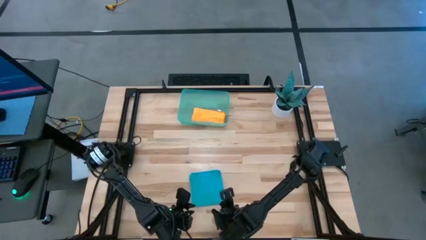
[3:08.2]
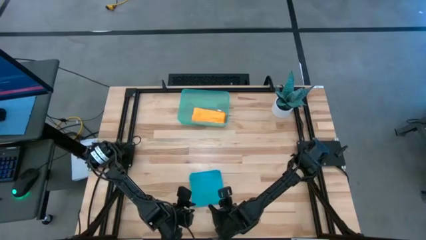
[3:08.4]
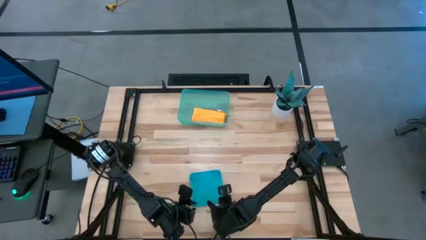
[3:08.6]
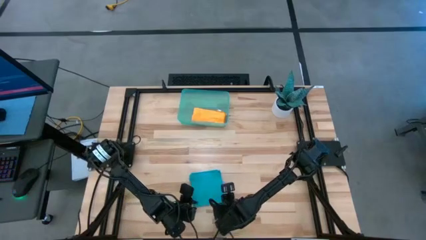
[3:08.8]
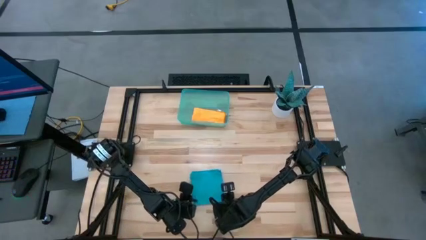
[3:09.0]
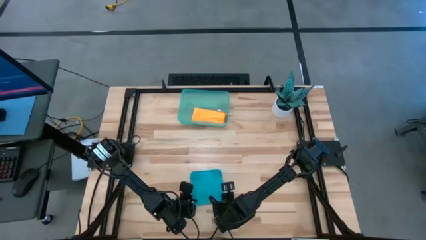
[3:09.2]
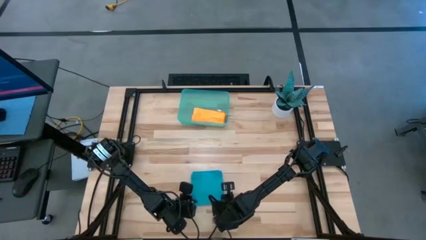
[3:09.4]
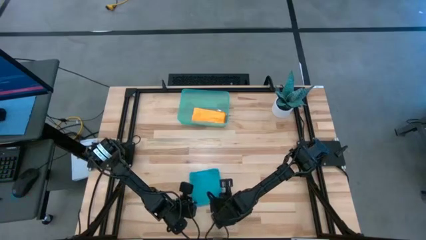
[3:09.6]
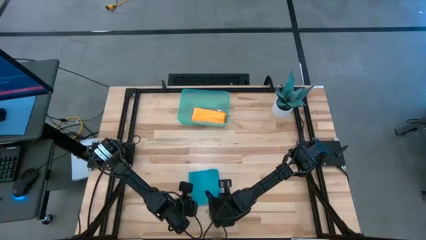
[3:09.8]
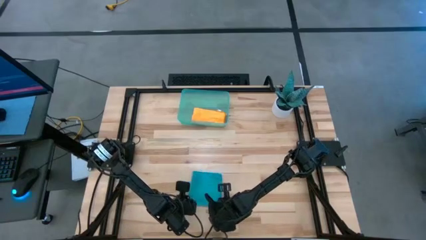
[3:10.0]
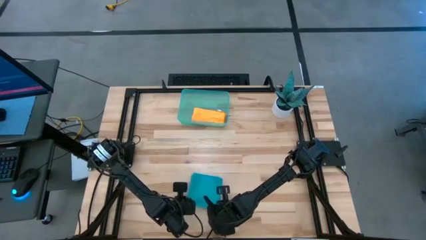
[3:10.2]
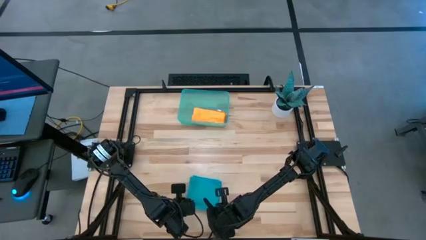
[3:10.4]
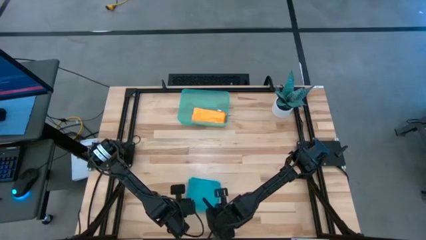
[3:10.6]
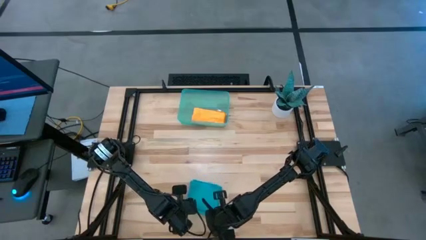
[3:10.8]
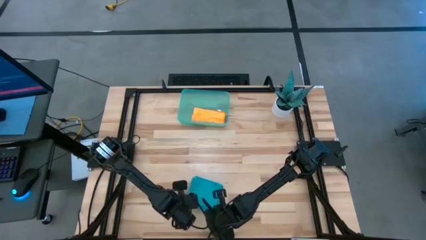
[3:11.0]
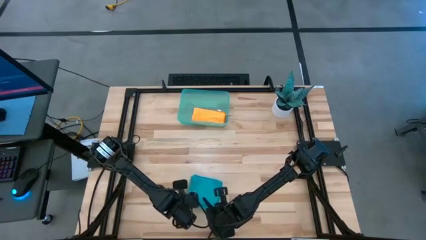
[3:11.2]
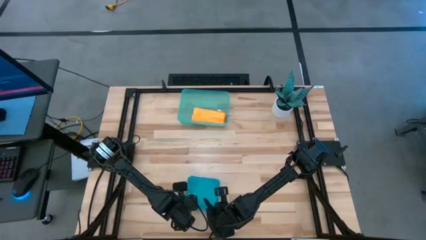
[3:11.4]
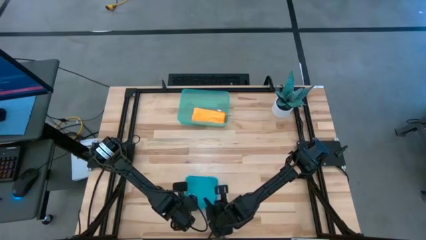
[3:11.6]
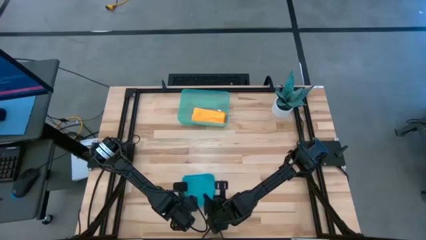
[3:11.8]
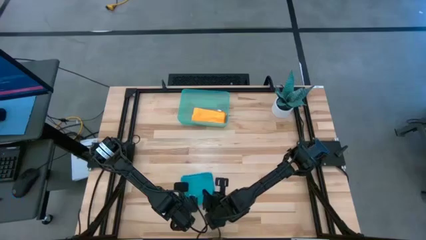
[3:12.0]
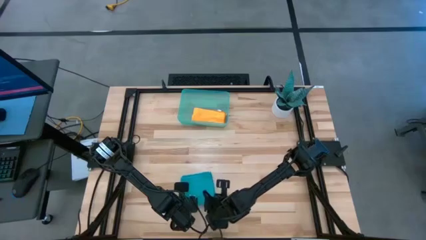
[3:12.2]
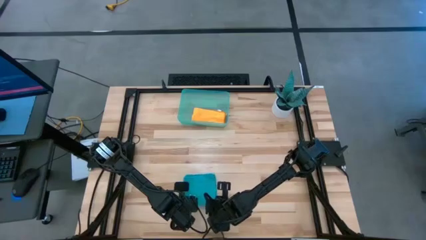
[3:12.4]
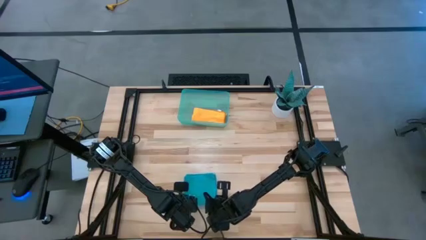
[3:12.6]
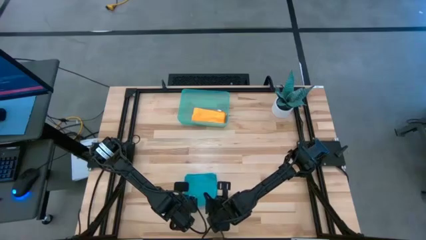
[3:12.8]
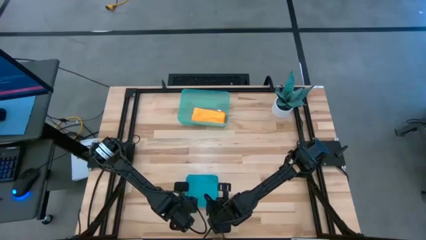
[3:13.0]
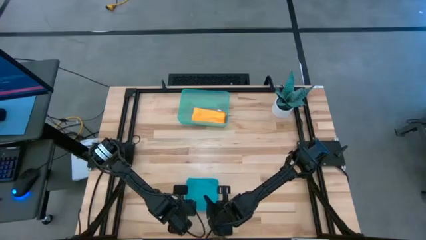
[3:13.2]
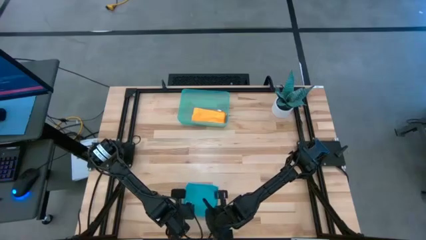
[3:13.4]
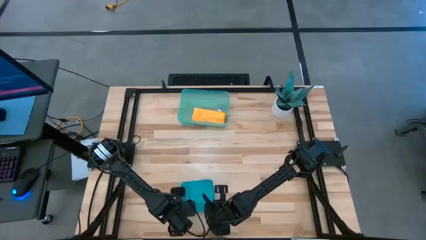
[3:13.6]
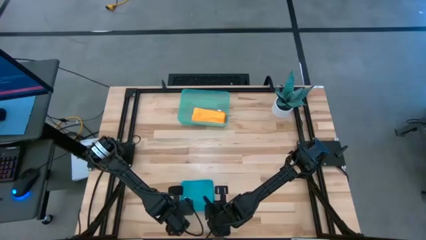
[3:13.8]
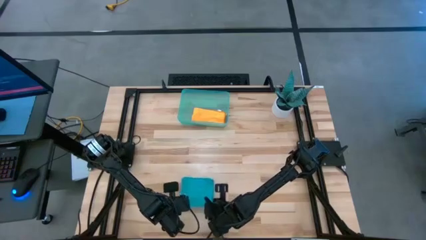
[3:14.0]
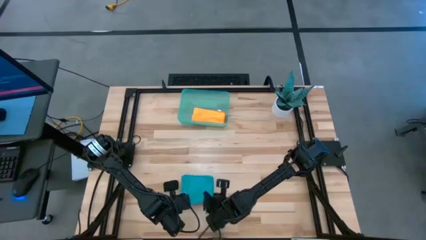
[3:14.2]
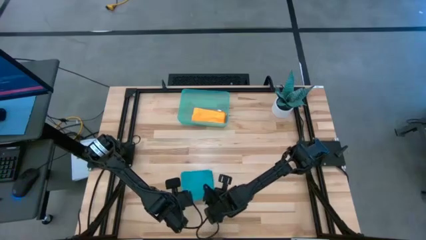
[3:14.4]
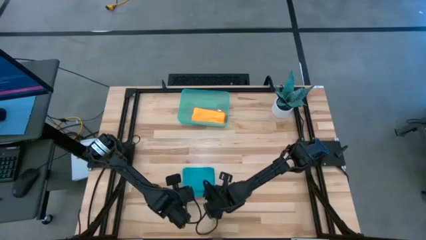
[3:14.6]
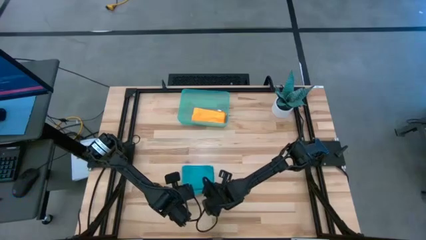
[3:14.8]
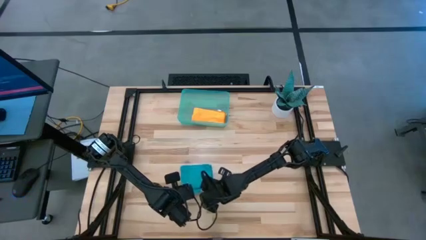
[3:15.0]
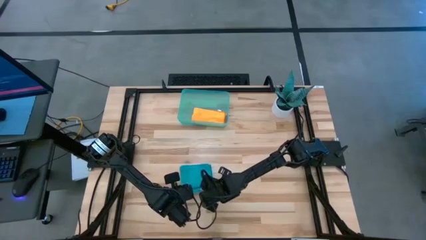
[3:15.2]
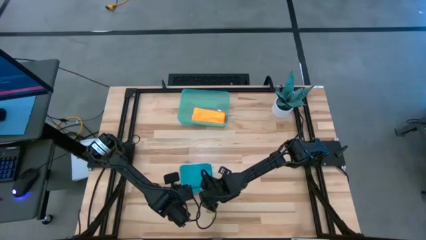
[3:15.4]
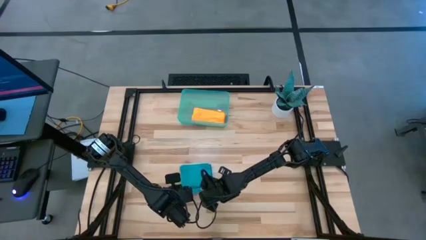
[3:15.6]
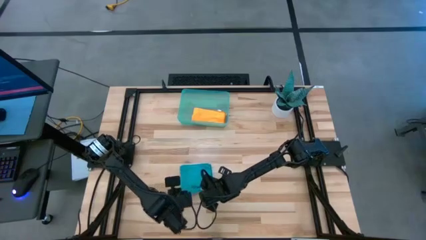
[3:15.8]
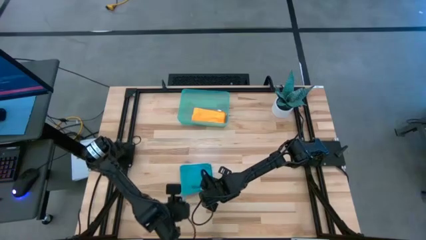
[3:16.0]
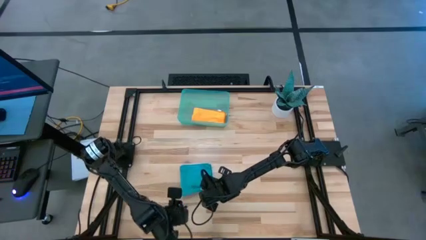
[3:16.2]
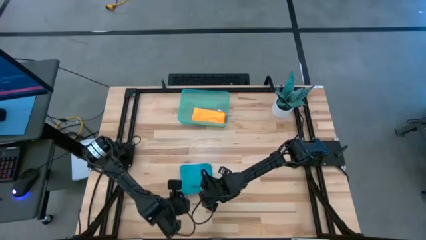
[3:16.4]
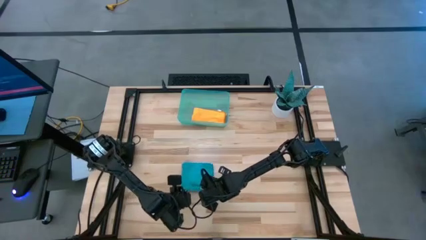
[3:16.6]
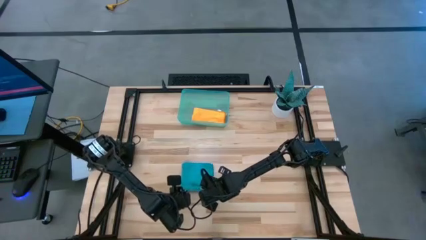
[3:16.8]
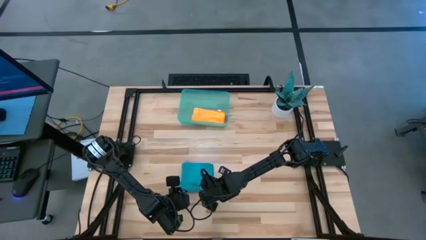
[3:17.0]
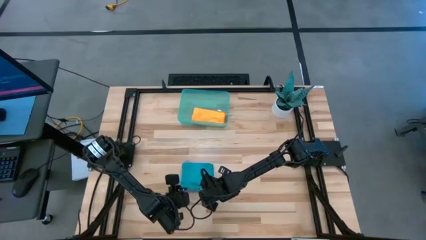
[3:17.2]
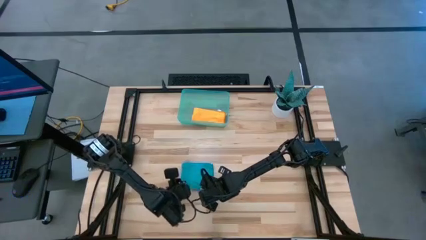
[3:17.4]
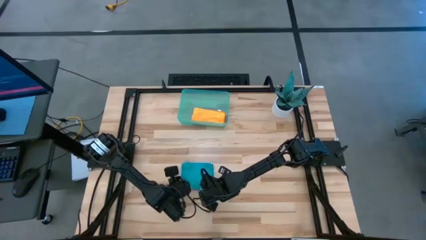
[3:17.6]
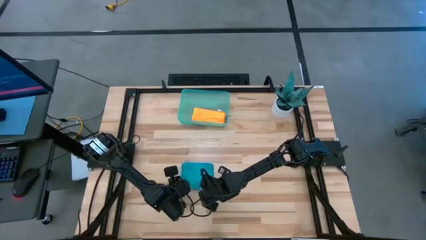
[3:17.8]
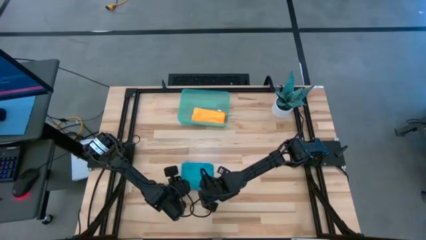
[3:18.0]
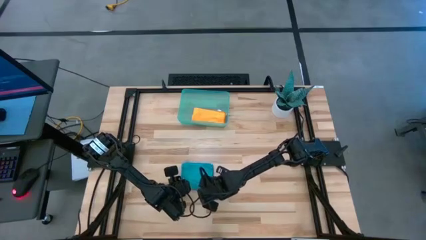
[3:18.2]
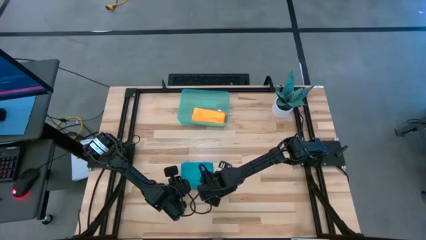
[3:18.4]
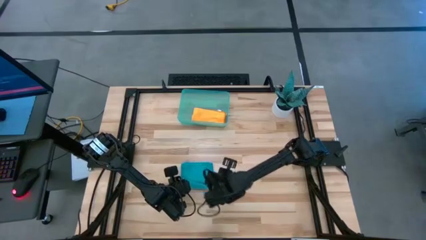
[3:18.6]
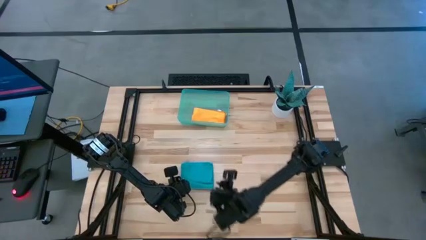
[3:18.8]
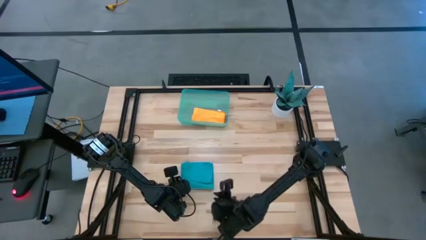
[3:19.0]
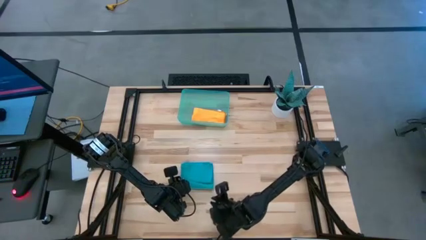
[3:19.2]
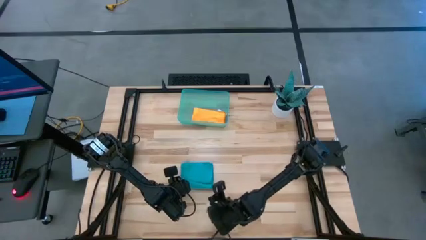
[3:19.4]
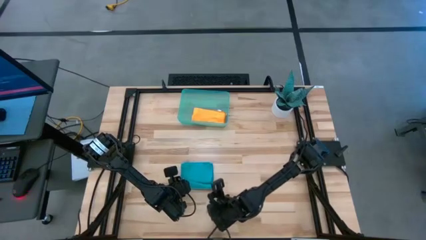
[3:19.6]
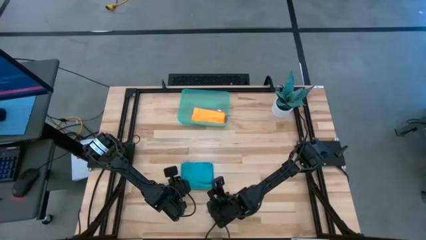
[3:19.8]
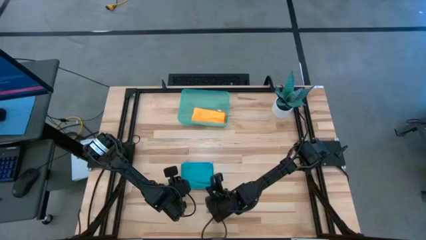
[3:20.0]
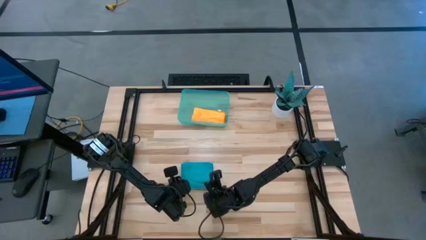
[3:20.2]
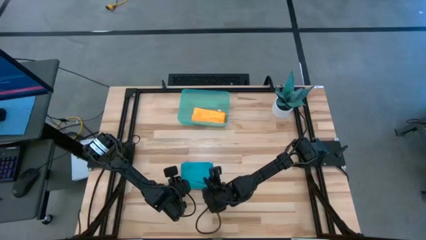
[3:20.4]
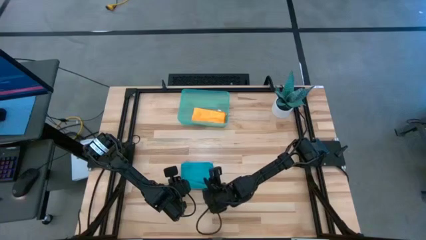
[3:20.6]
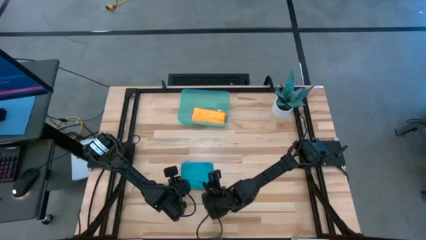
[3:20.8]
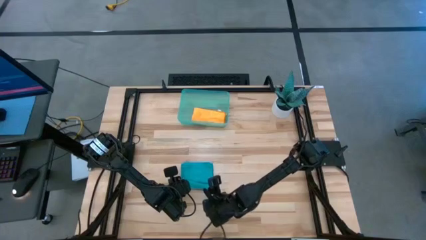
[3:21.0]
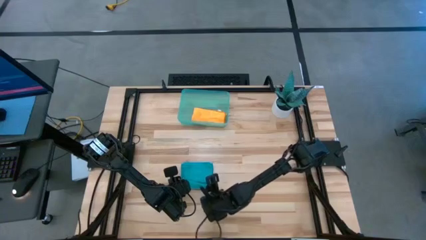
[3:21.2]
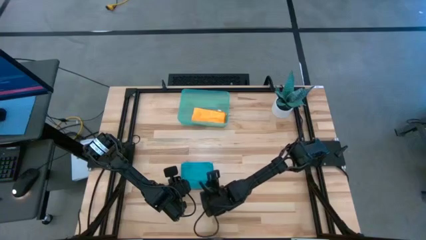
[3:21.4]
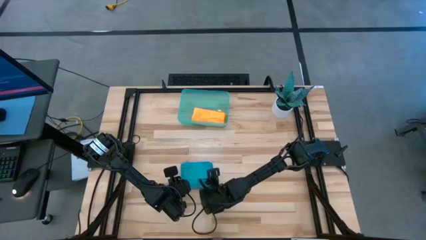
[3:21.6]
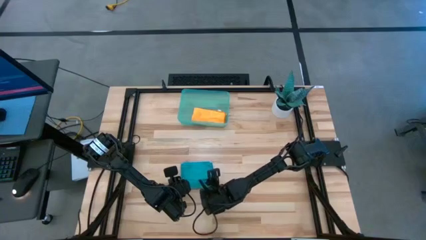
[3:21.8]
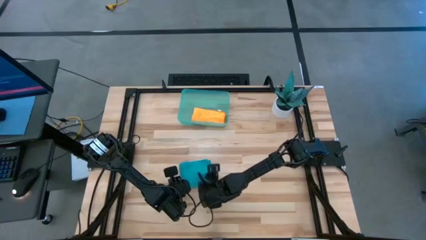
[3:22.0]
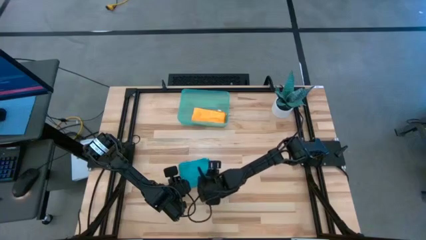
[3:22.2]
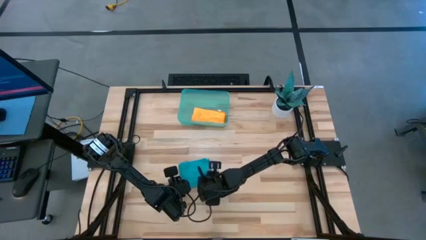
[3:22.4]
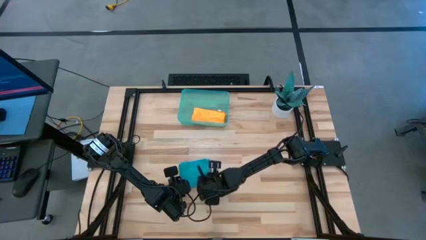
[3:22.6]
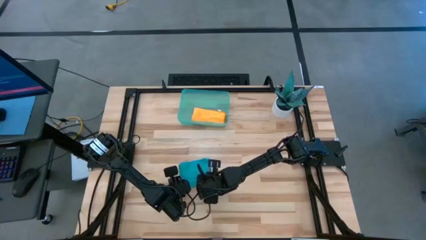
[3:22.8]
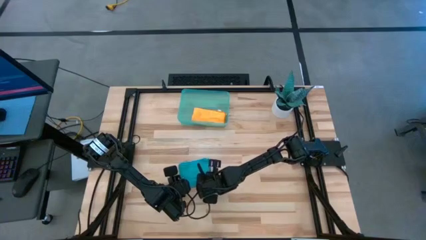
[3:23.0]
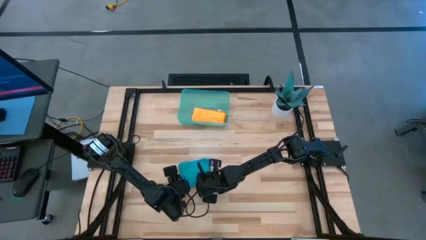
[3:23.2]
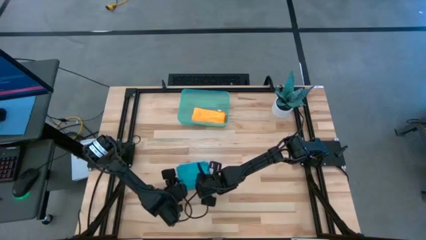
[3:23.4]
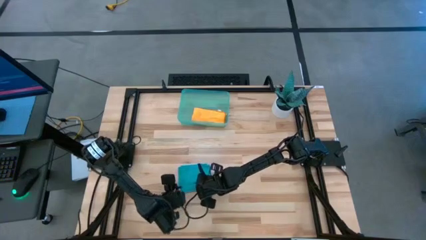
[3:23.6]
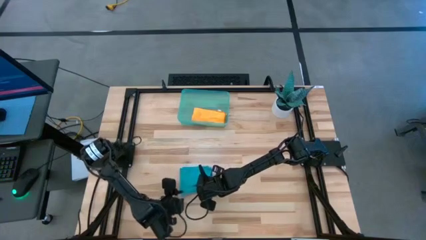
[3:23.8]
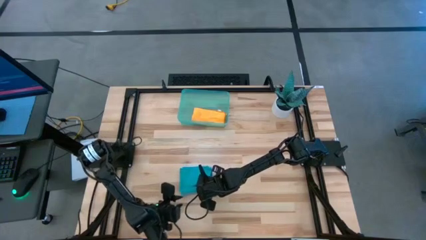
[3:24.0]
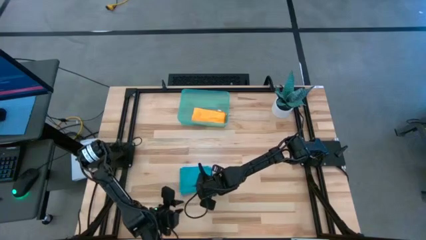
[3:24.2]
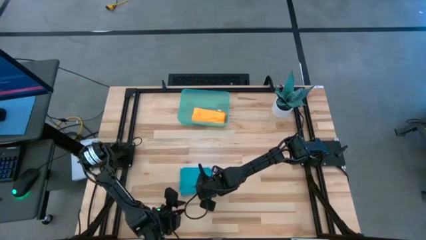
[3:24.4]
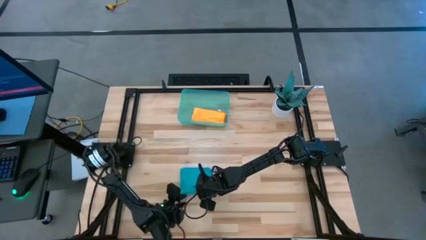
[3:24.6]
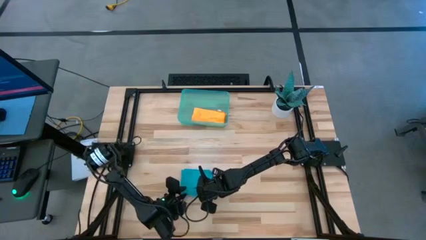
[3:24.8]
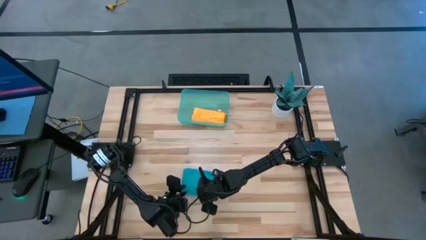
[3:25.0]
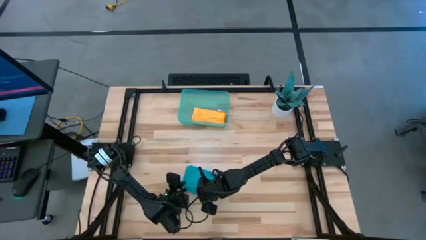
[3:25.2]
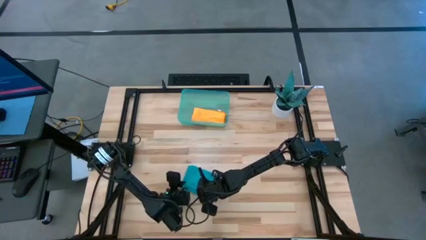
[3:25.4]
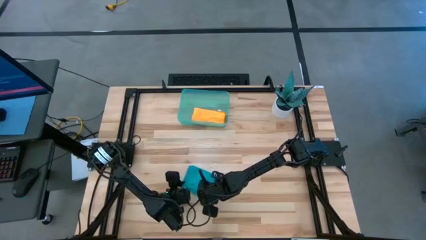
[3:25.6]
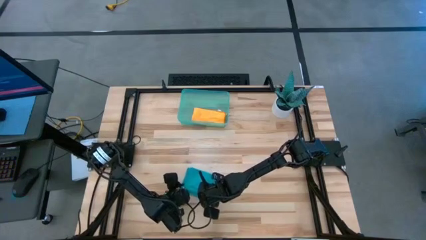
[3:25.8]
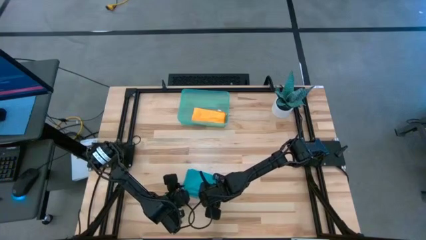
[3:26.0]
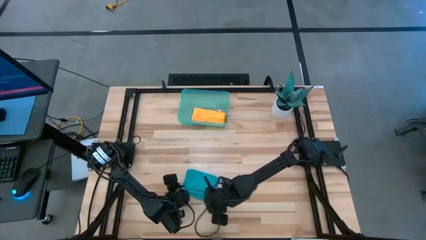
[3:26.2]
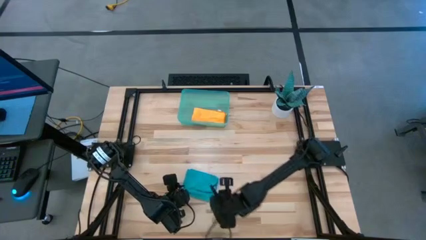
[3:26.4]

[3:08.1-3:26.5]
Task: Roll microfiber towels into tight, uniform cylinder then place into a basket
Roll the blue microfiber towel
